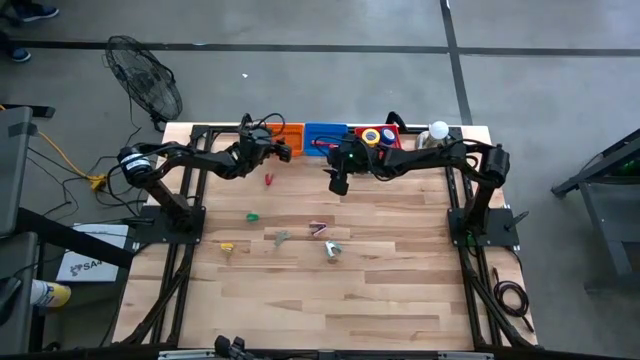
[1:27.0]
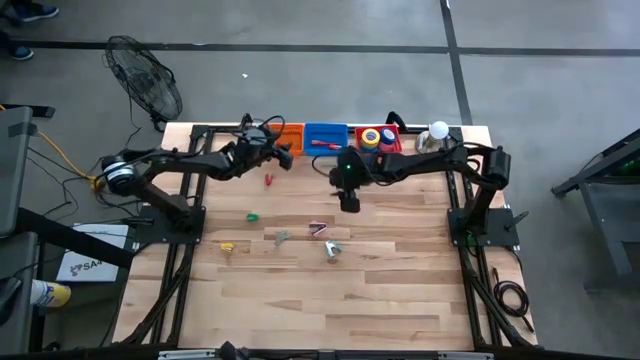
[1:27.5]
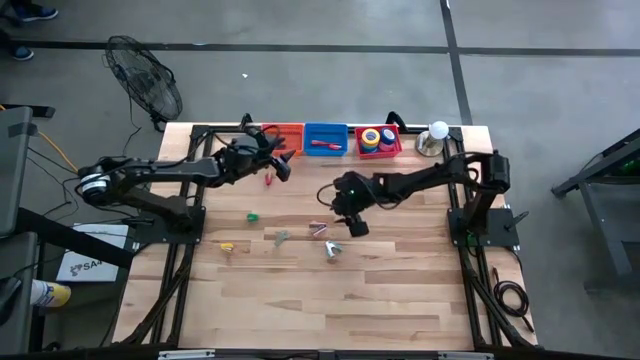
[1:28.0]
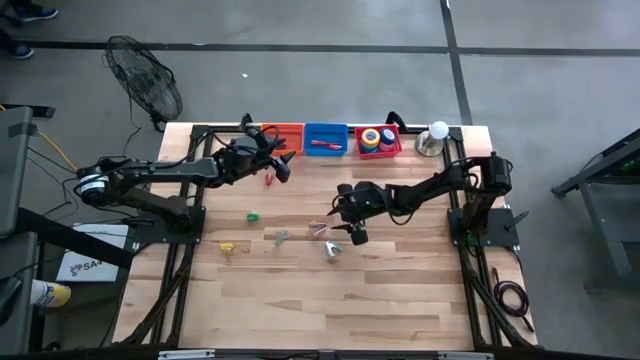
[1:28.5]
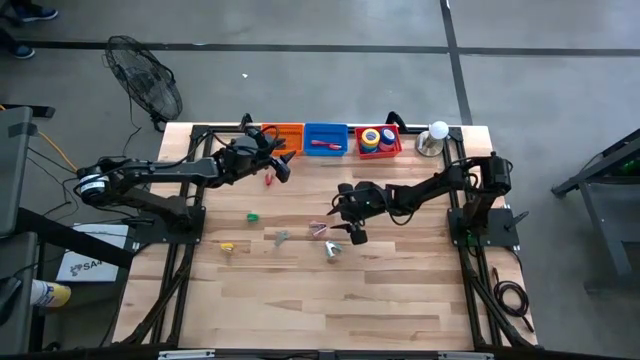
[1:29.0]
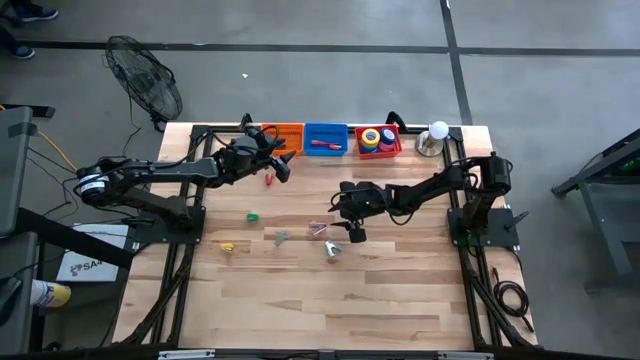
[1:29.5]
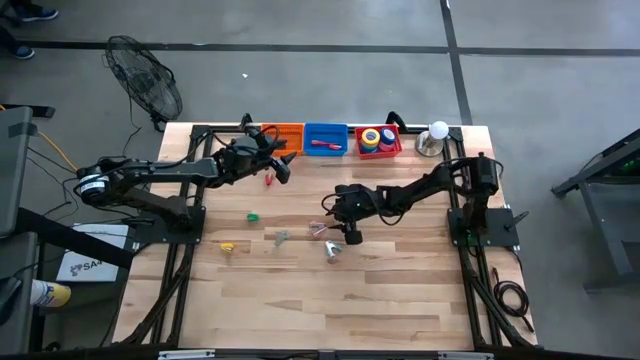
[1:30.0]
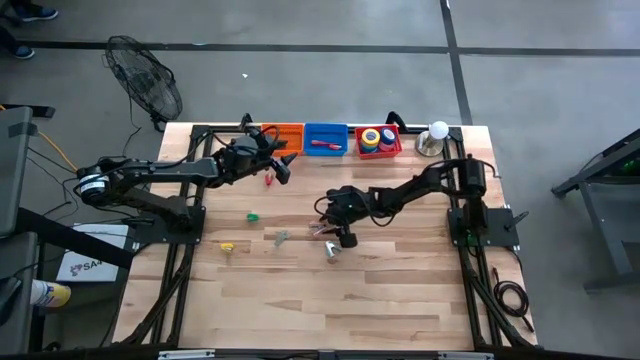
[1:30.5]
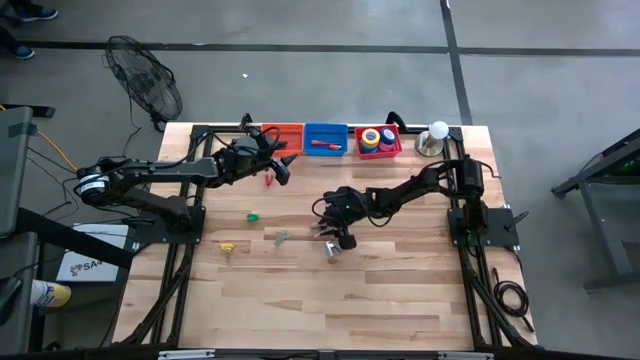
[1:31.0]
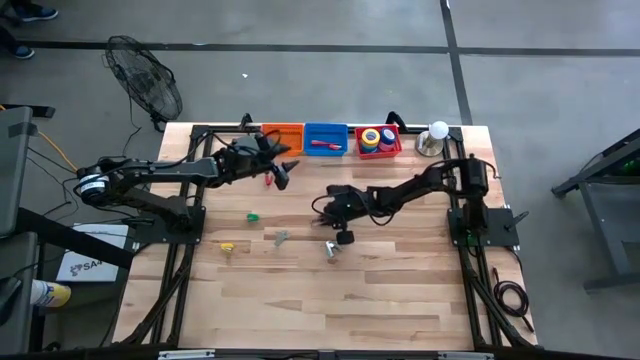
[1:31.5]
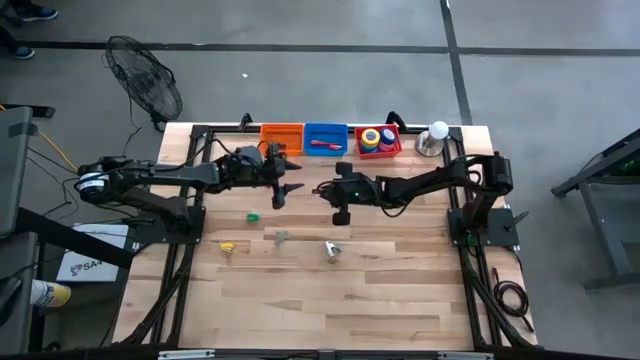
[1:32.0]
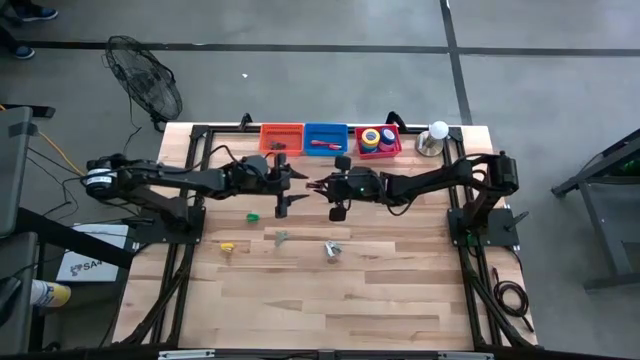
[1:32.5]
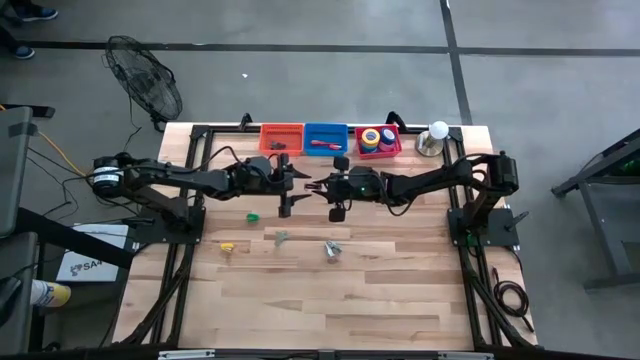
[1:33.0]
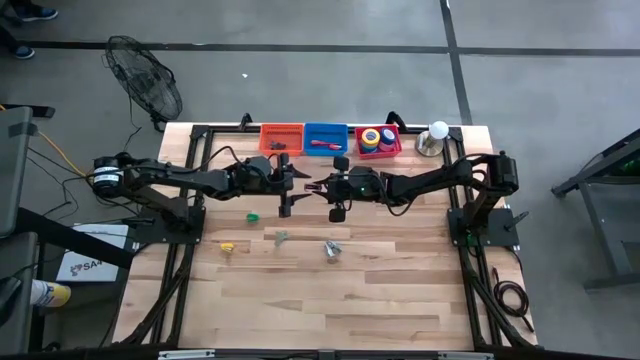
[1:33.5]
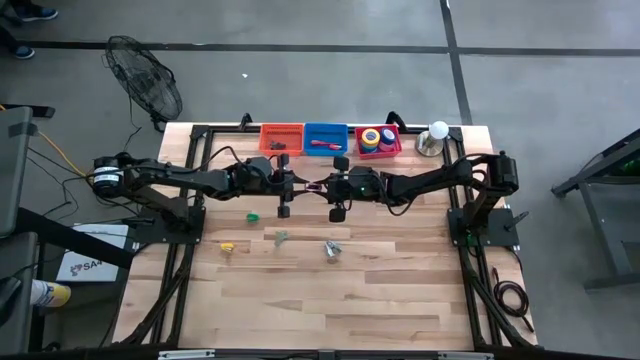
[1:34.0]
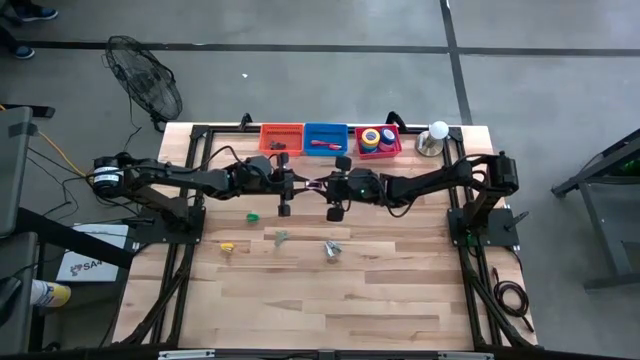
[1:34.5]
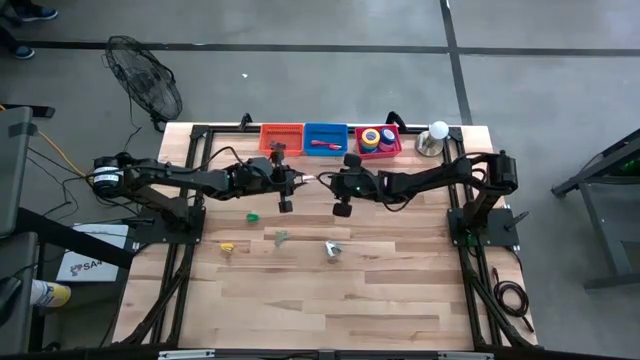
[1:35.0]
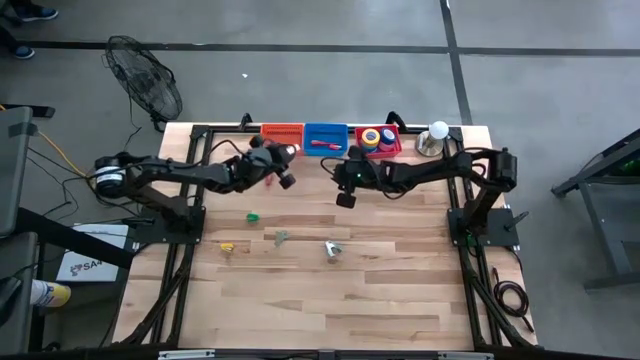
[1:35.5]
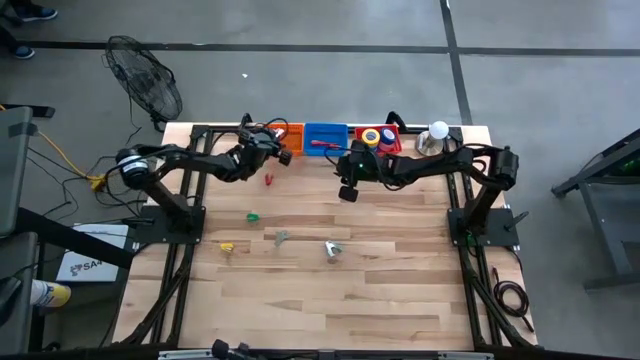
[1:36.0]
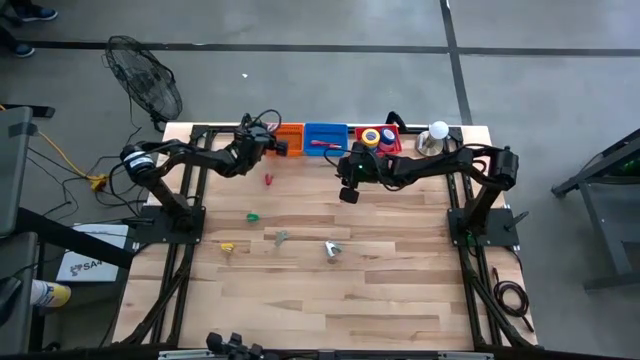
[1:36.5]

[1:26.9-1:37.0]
Task: Pick and place Stapler, Stapler remover, tape
Put the pink staple remover into the orange bin

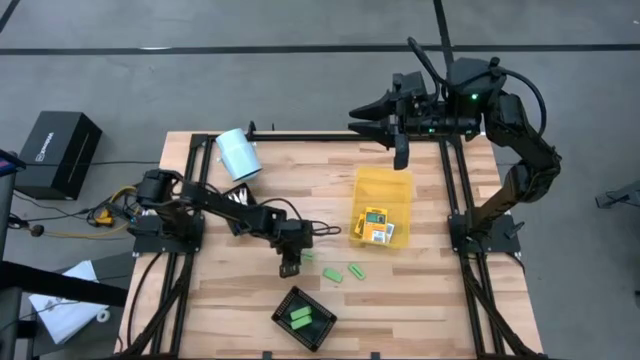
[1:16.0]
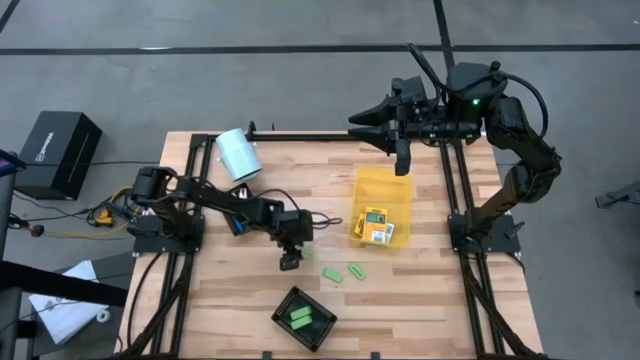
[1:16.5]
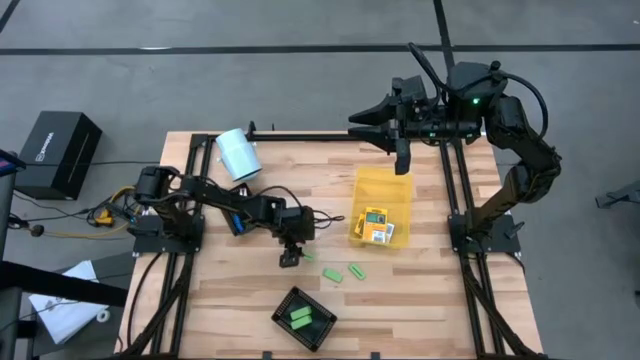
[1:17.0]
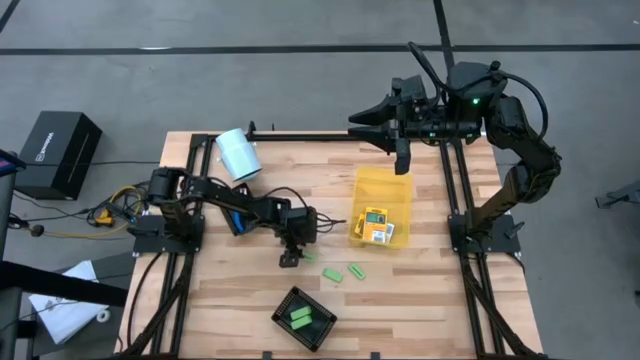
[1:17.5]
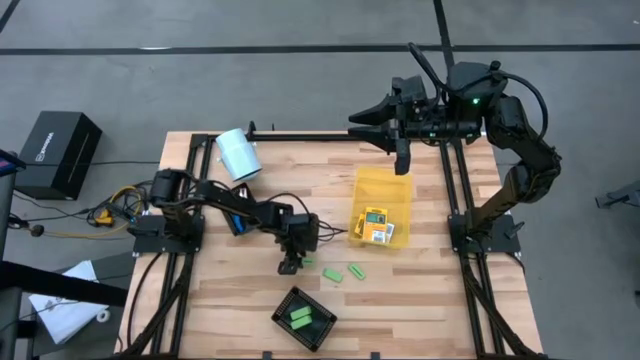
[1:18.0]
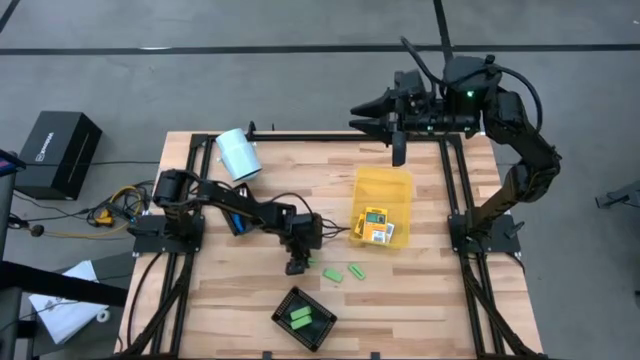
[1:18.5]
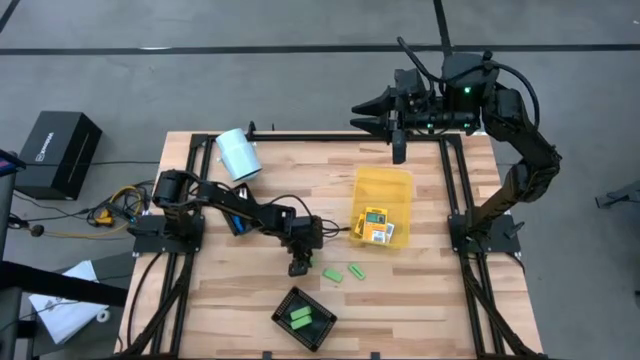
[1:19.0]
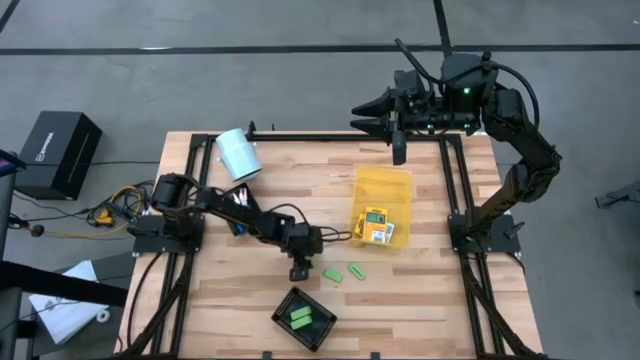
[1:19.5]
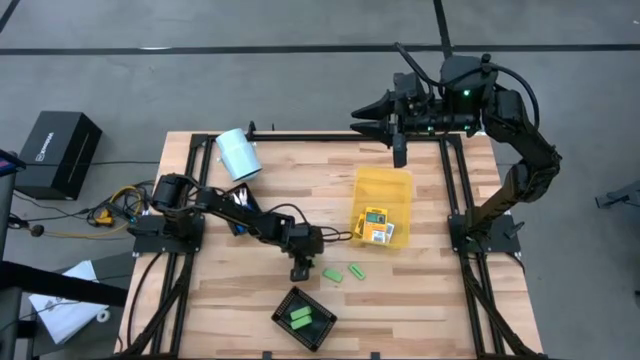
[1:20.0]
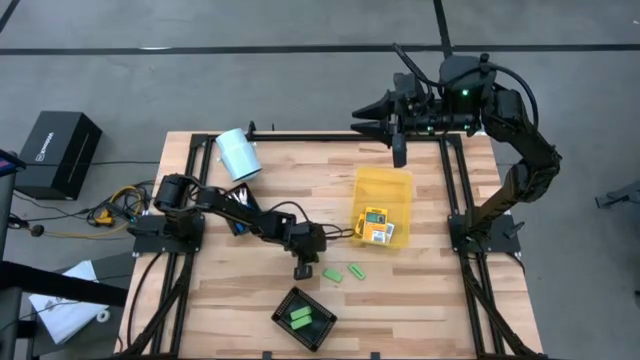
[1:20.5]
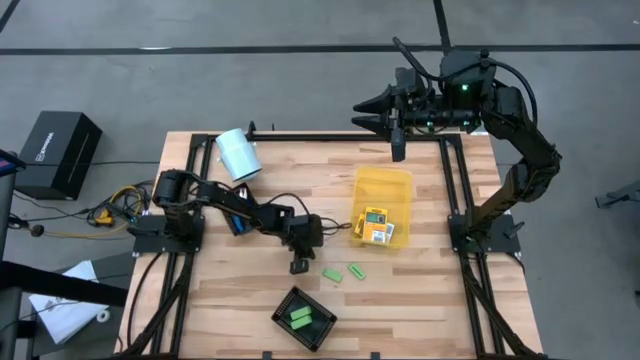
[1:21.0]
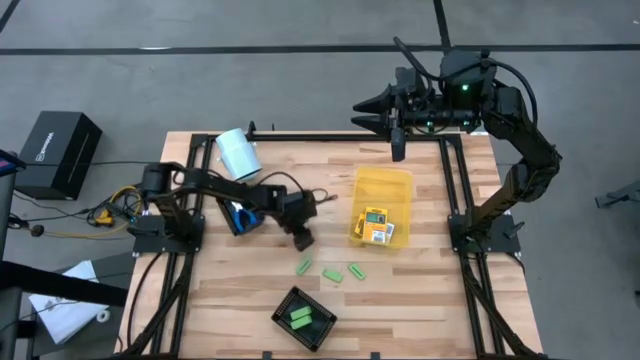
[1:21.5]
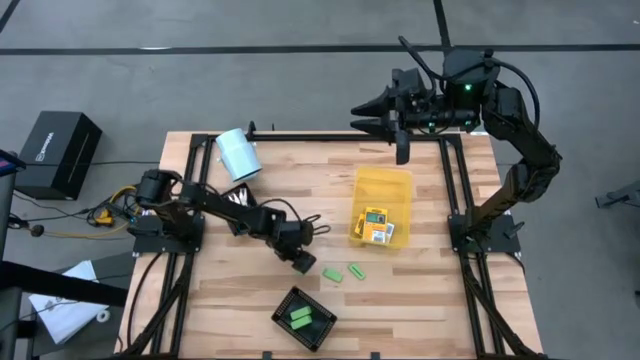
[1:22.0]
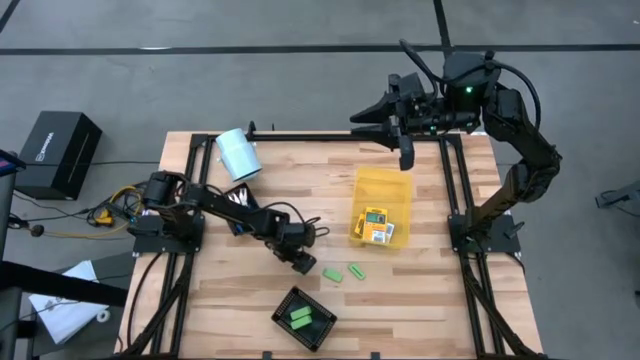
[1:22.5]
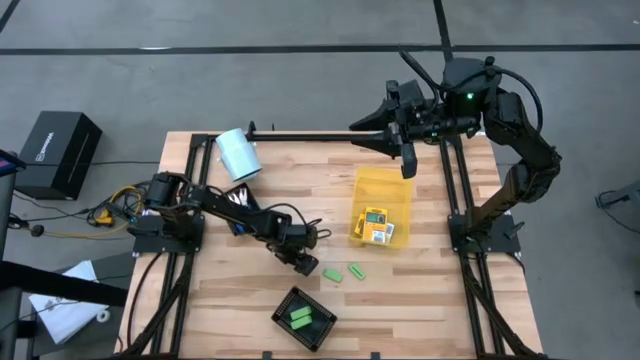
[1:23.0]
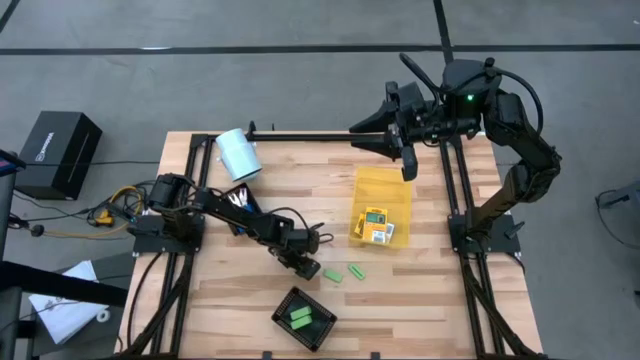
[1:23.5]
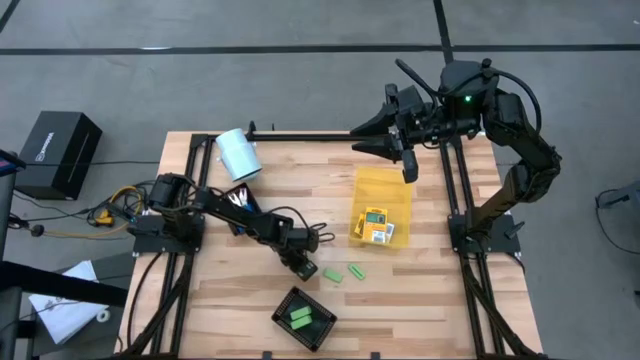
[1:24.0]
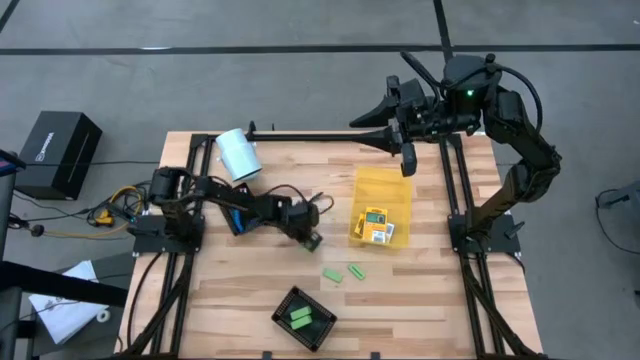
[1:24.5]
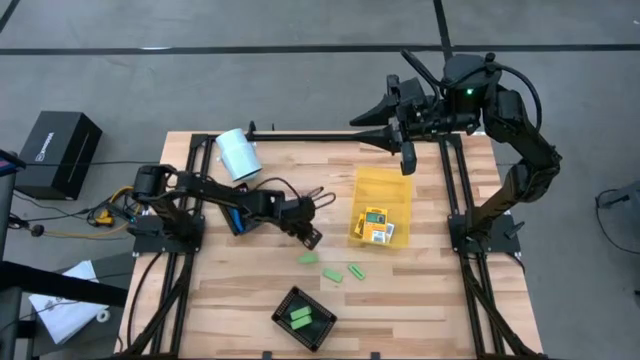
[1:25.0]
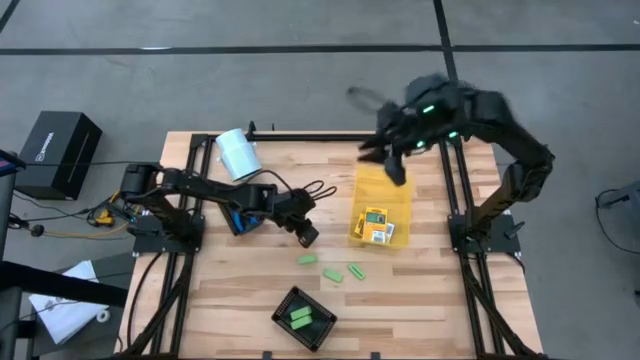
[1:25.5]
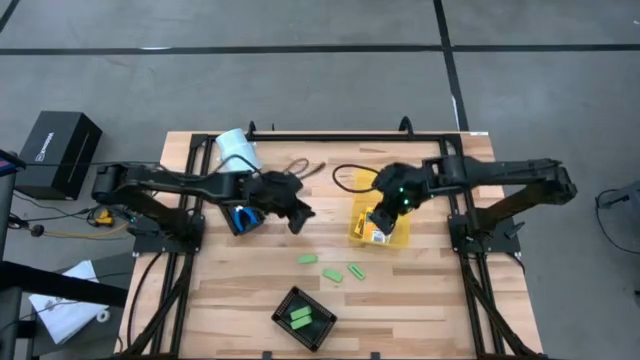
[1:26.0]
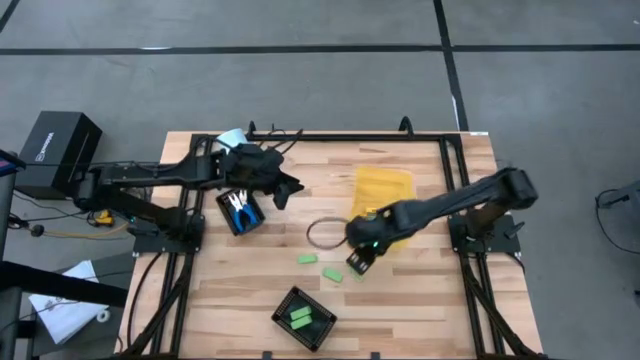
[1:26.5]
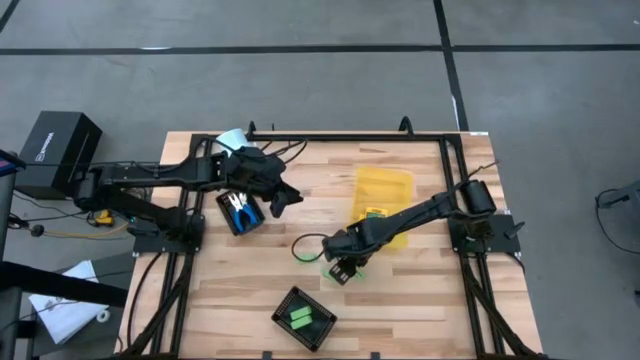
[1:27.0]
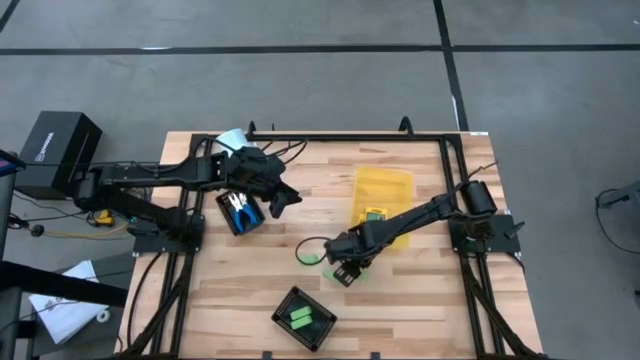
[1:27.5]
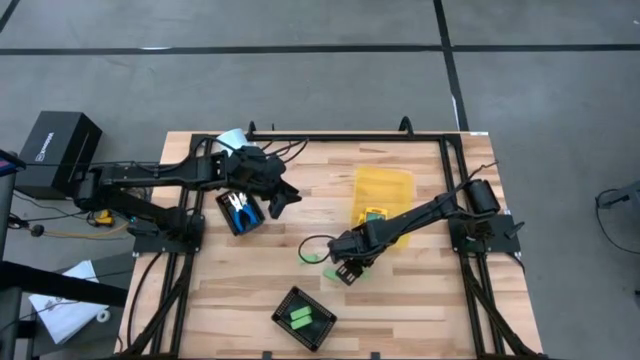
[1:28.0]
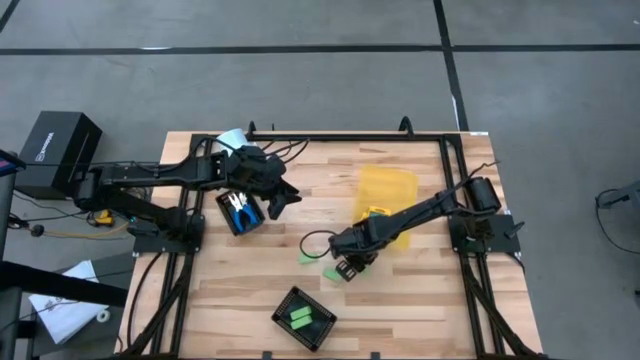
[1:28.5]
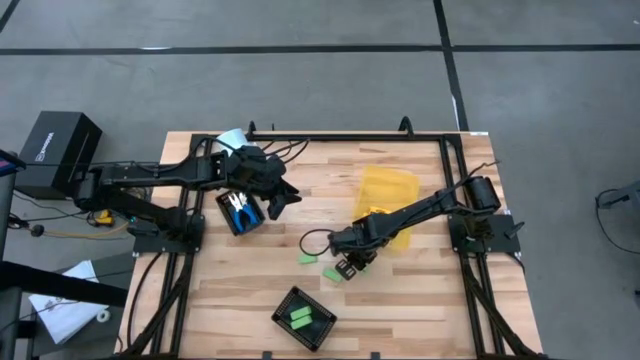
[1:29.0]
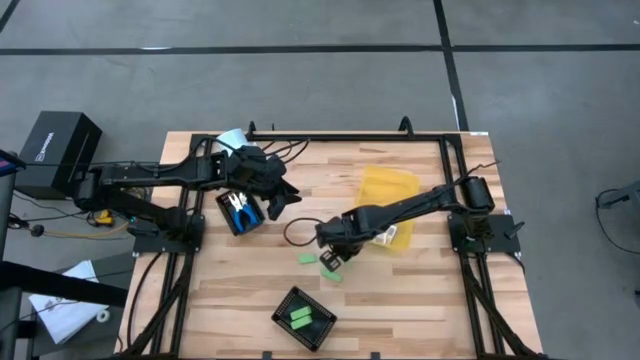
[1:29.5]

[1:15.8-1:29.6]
Task: Pick & Place School Supplies
Put the green eraser into the bottom black bin
